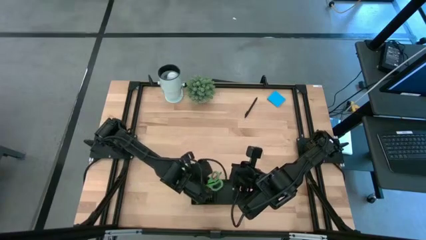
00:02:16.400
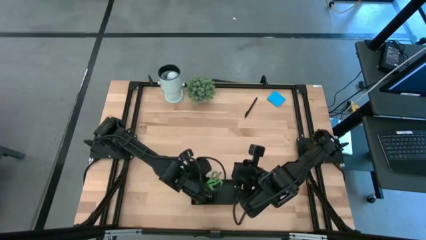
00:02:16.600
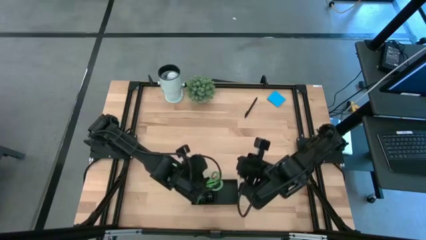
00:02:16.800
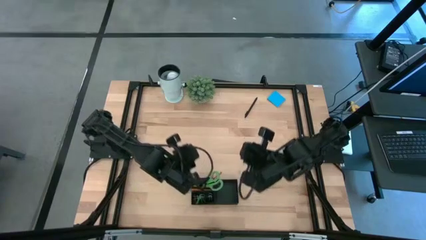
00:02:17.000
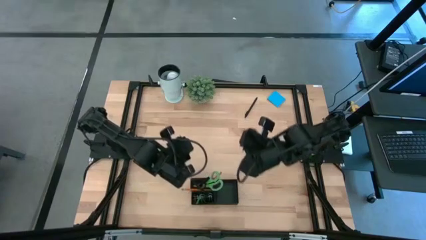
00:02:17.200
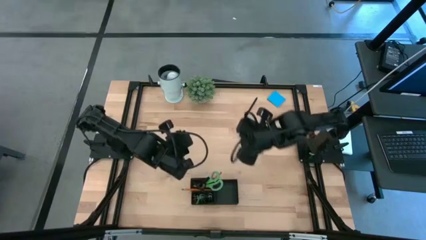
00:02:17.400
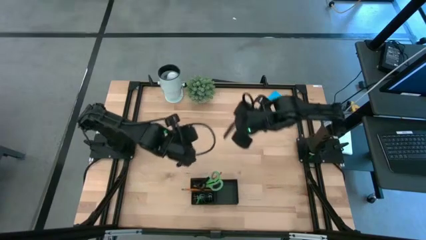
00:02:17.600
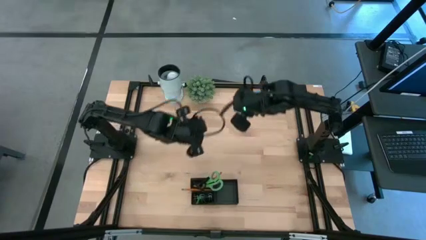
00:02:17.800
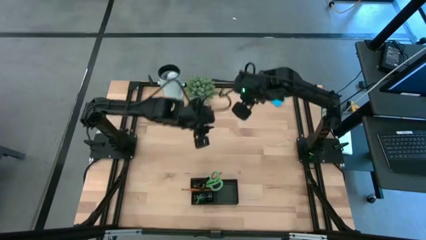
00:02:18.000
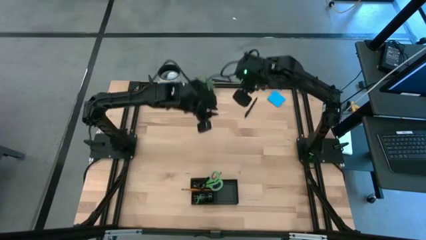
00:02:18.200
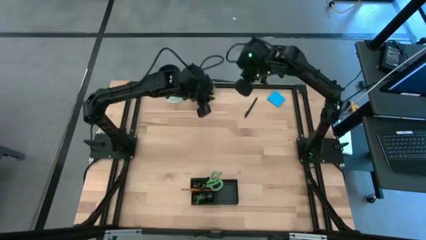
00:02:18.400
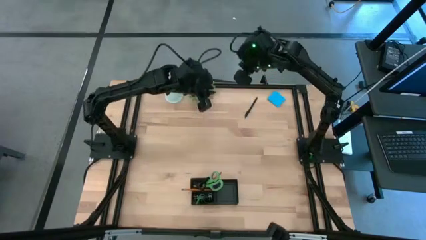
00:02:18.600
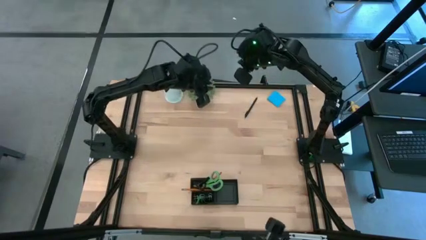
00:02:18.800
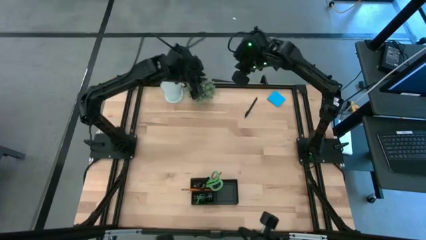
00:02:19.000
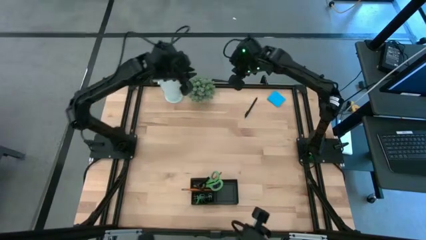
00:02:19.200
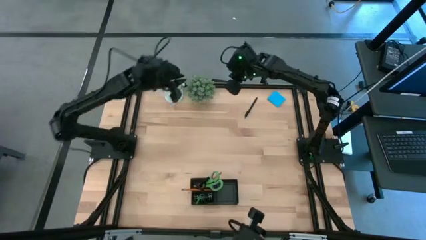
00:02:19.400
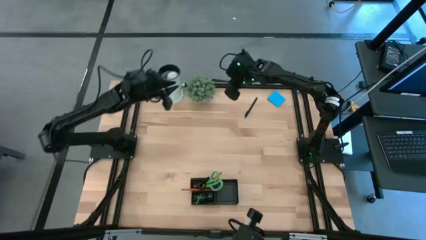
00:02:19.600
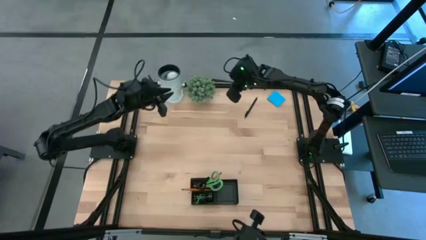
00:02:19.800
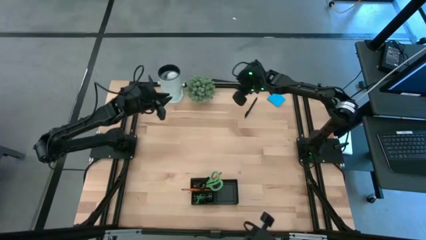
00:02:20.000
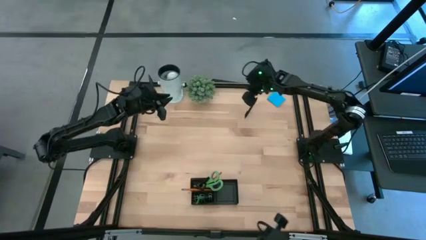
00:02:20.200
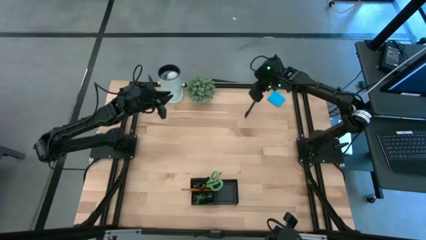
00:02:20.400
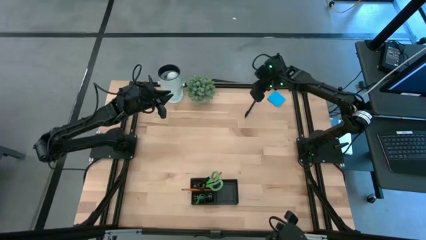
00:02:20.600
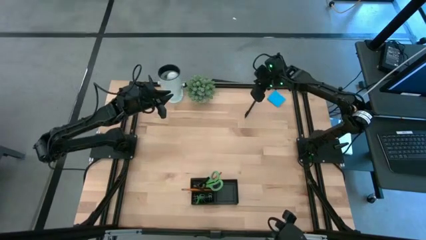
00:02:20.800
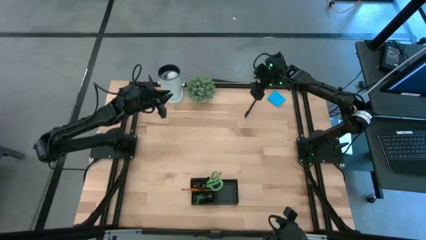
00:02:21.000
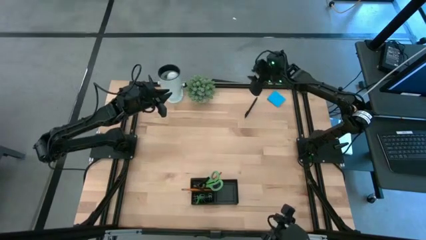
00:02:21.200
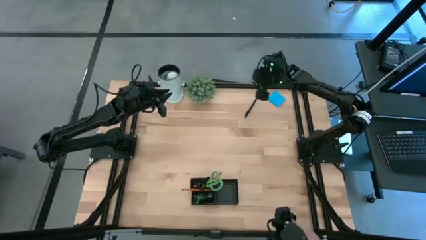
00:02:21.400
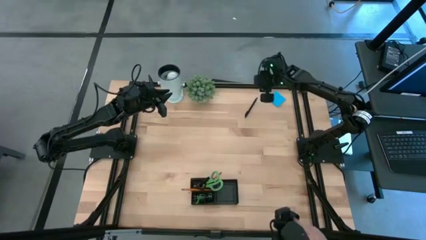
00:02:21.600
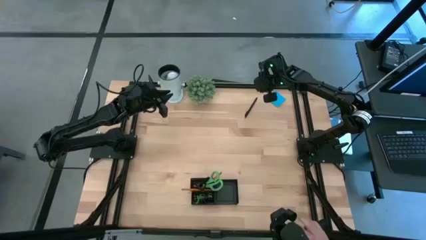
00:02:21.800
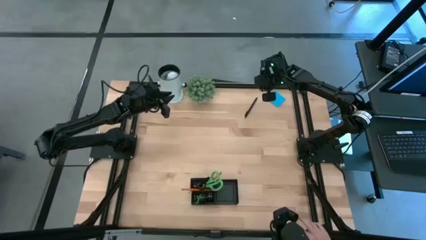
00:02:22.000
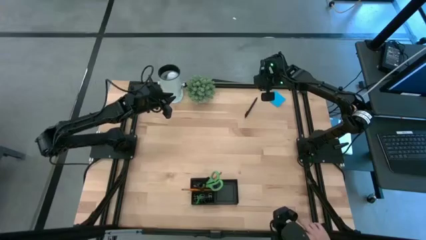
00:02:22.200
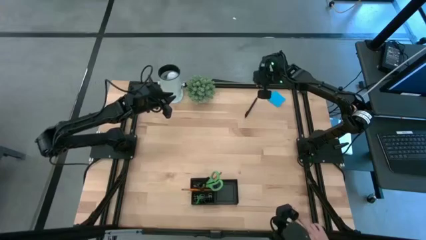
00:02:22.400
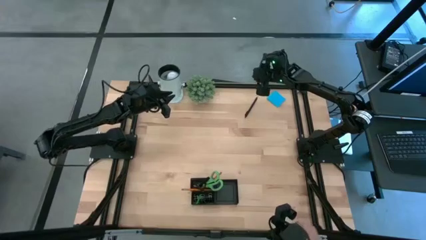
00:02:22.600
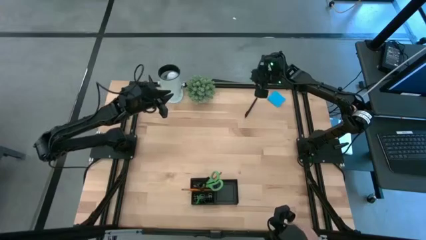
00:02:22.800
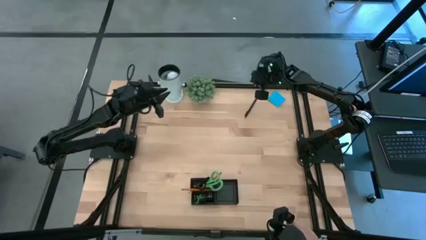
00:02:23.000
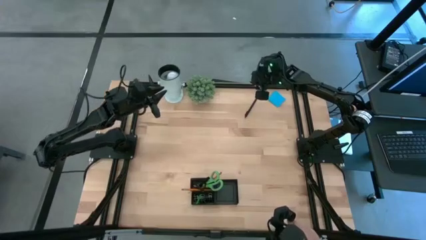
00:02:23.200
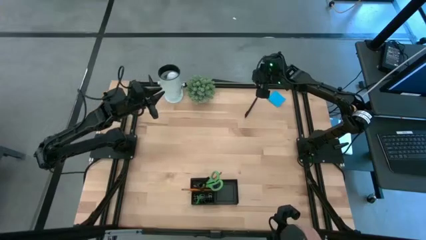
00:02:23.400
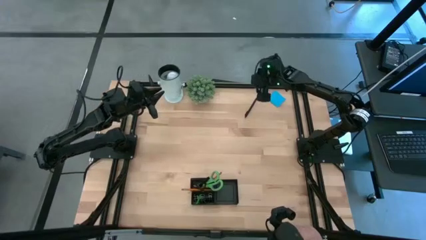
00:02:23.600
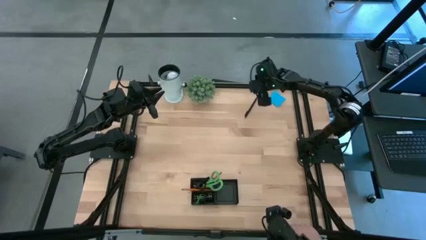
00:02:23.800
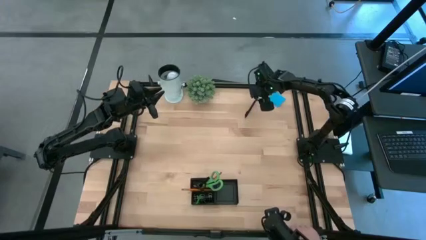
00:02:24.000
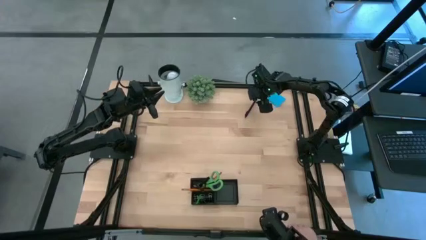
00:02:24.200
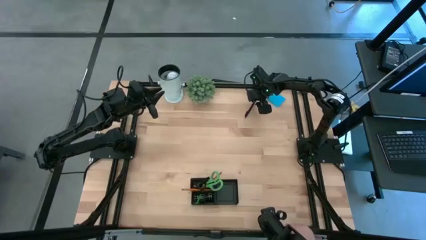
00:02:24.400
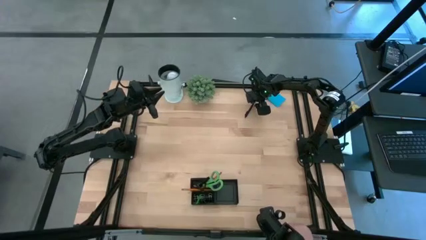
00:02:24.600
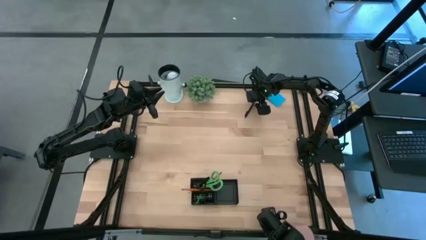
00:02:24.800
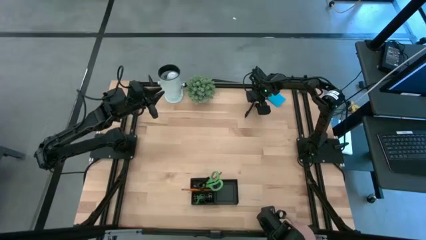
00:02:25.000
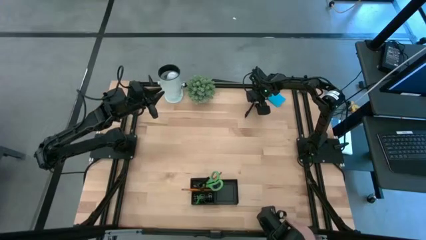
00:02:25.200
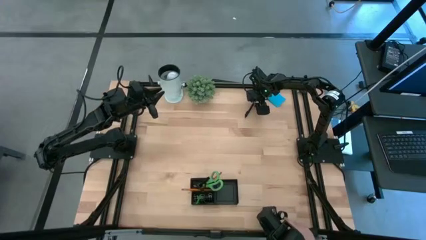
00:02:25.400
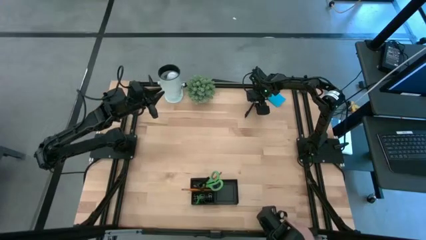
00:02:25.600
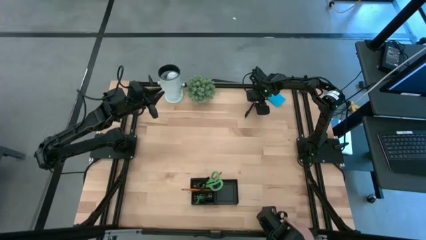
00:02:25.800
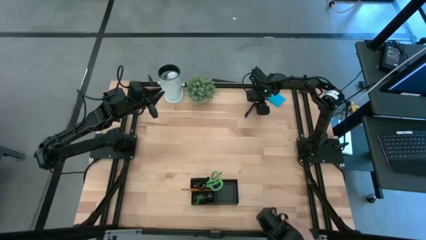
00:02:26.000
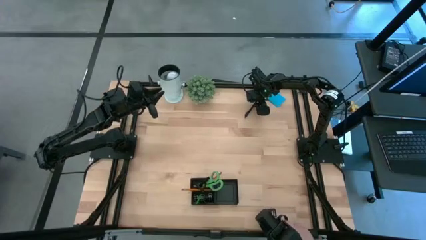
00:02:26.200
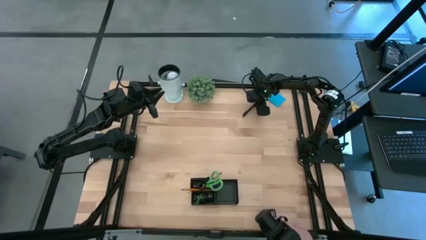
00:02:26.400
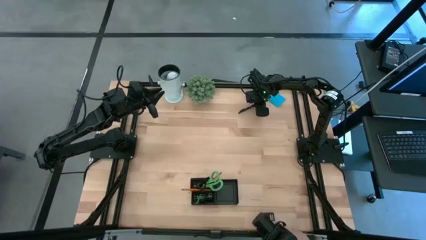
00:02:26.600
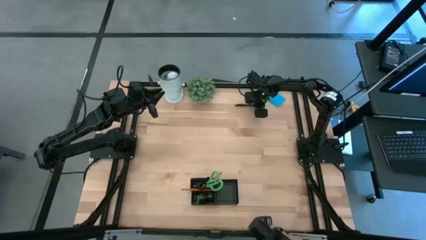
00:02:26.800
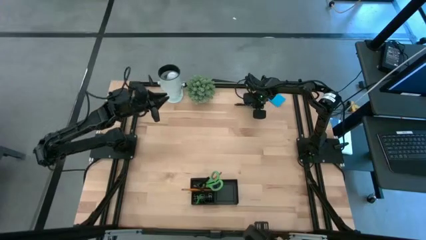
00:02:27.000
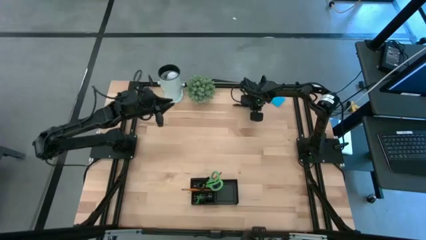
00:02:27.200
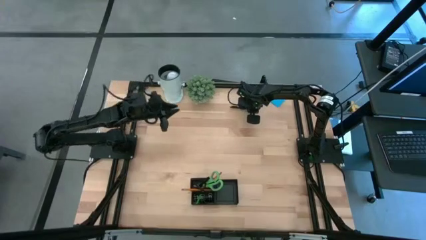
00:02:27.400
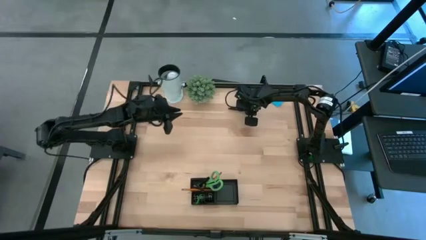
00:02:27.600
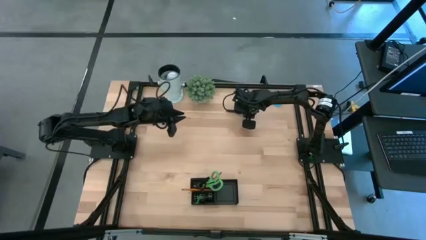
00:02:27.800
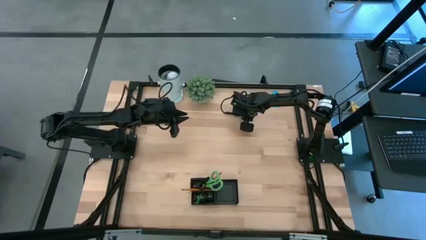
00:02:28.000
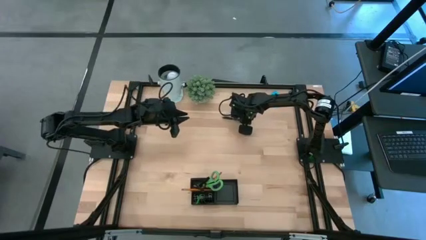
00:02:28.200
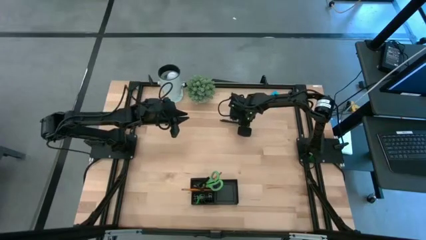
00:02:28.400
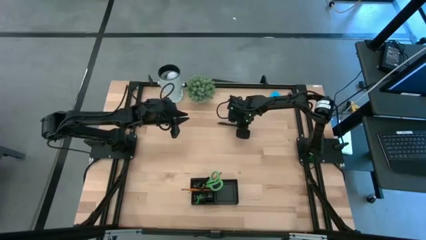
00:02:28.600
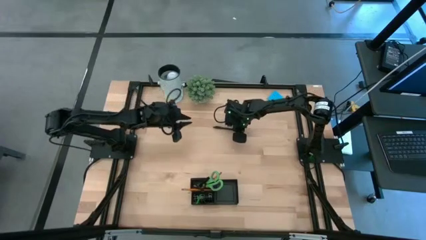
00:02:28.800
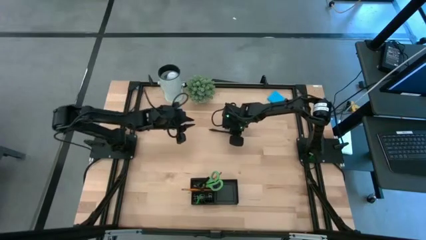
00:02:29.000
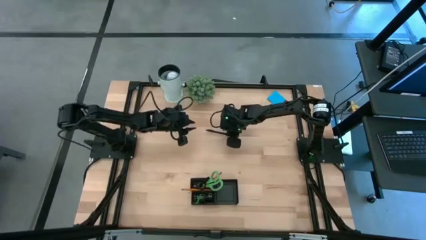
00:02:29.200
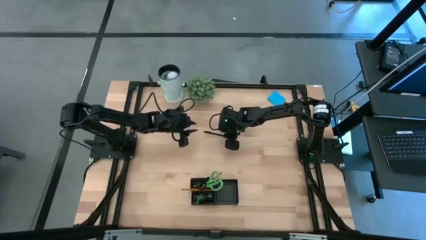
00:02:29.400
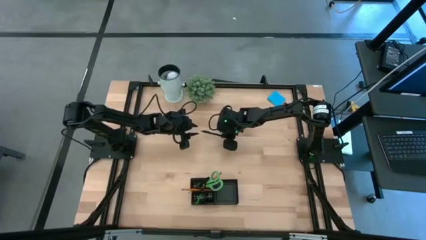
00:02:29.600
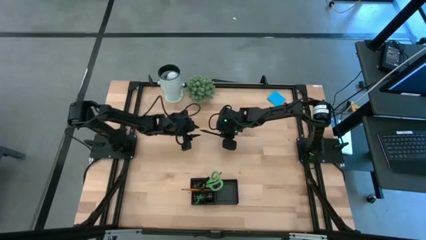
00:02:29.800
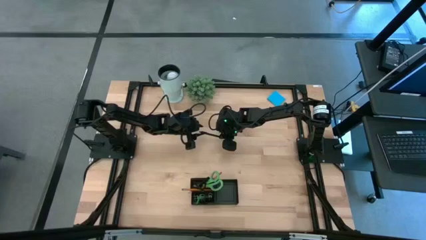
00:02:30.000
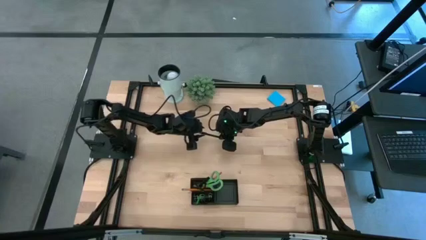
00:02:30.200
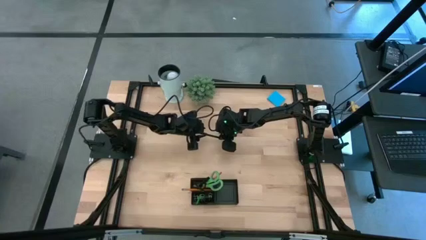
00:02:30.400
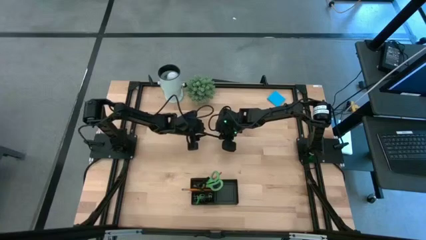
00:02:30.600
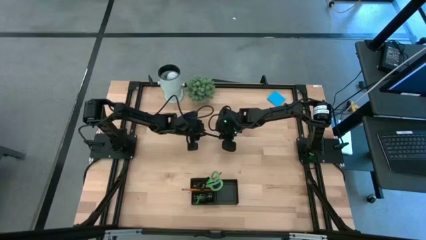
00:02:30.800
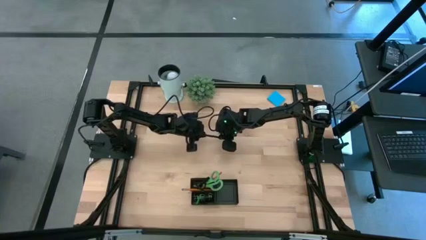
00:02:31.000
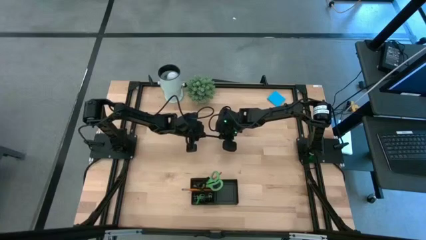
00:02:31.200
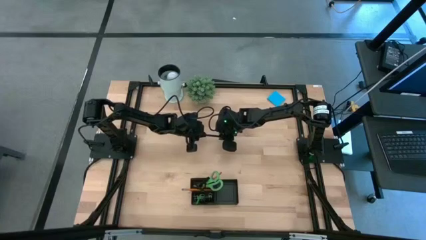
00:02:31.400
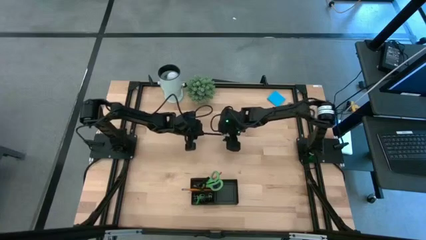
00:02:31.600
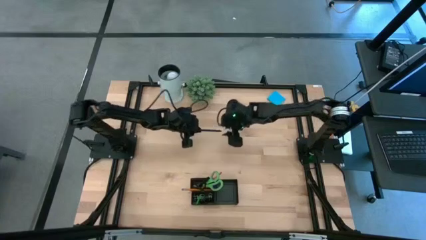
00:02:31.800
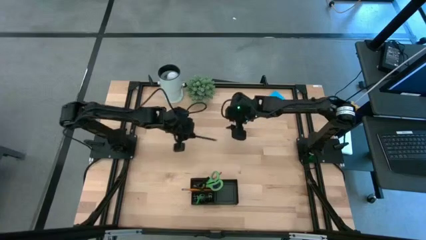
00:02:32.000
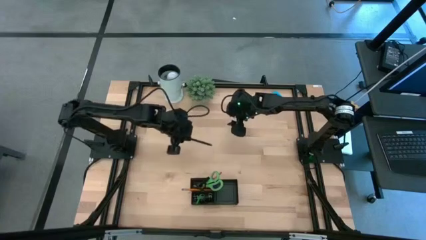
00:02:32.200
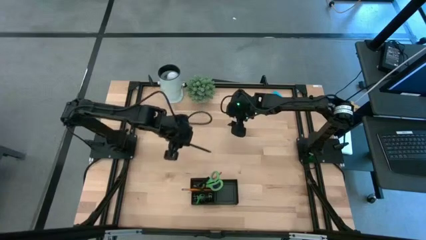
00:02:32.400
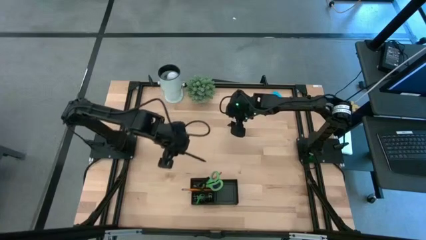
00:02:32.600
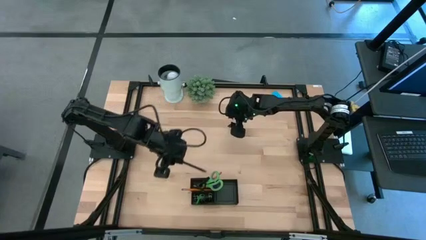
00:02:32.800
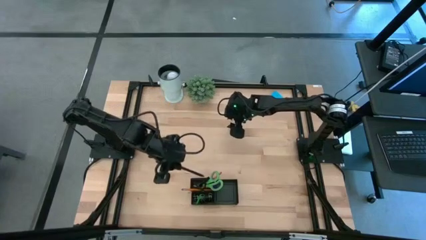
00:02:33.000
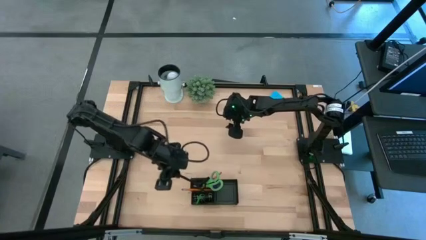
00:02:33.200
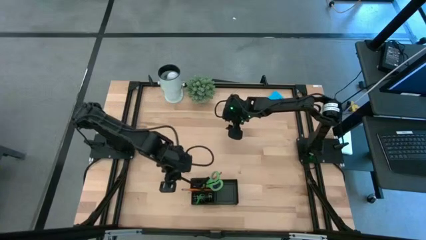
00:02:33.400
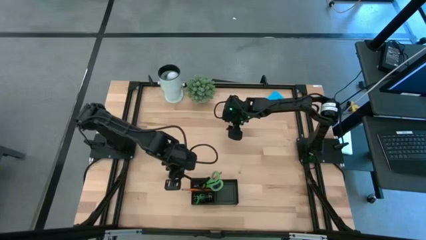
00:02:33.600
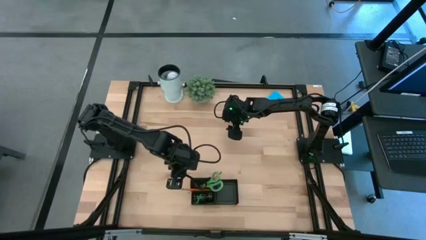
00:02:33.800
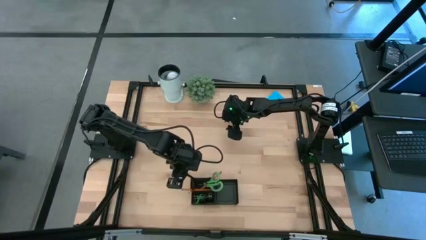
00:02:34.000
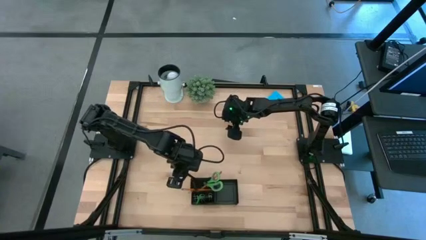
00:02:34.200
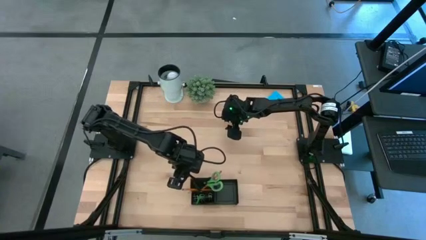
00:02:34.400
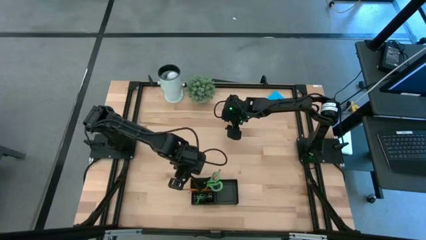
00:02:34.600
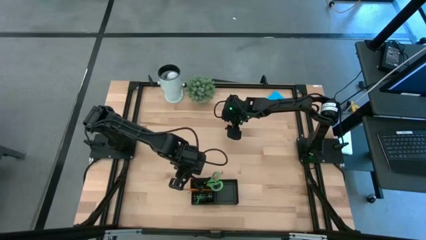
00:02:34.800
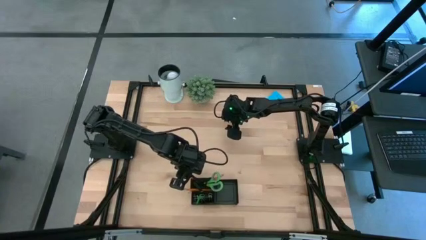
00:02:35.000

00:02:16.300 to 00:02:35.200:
Task: Pick and place office supplies into organizer
Put the black pen into the black desk organizer
